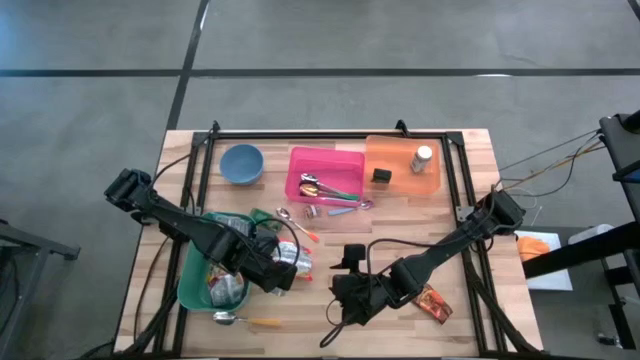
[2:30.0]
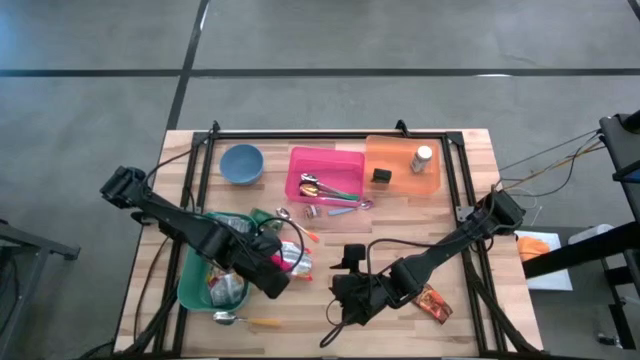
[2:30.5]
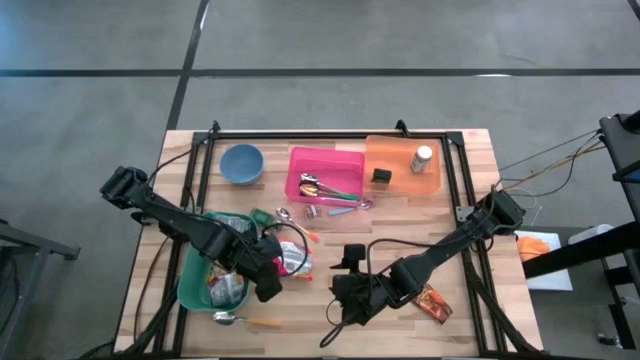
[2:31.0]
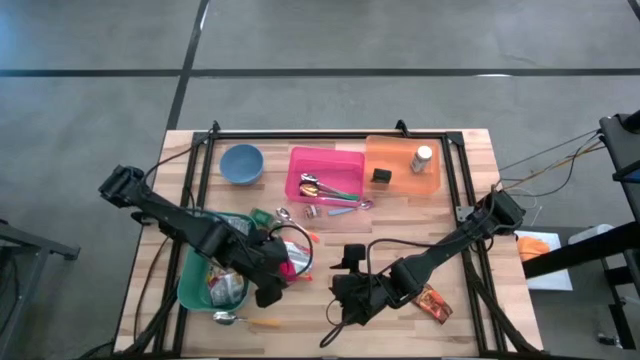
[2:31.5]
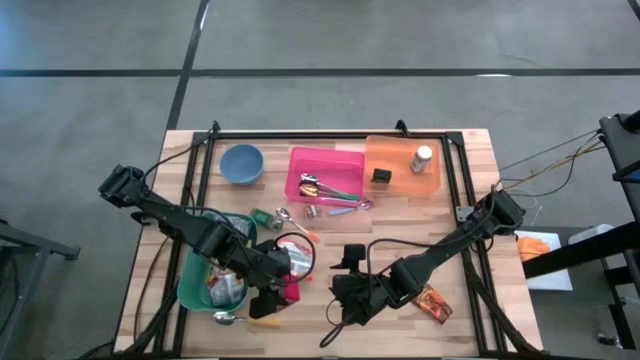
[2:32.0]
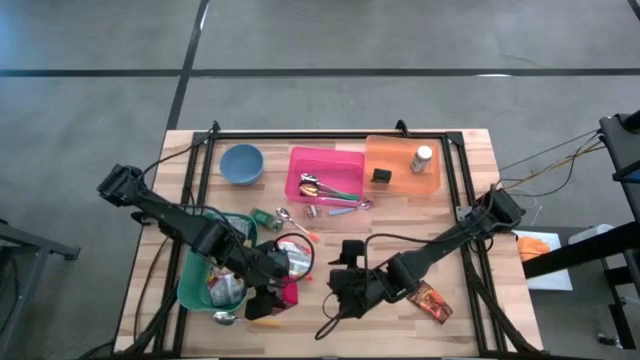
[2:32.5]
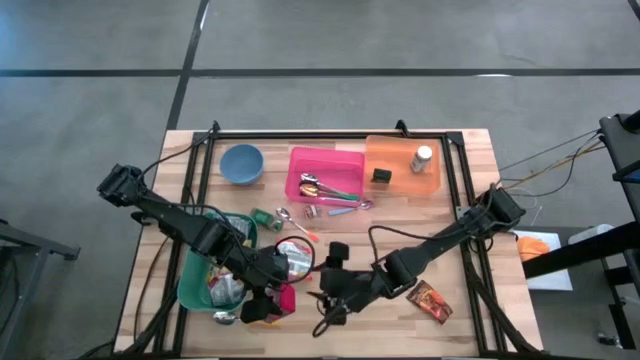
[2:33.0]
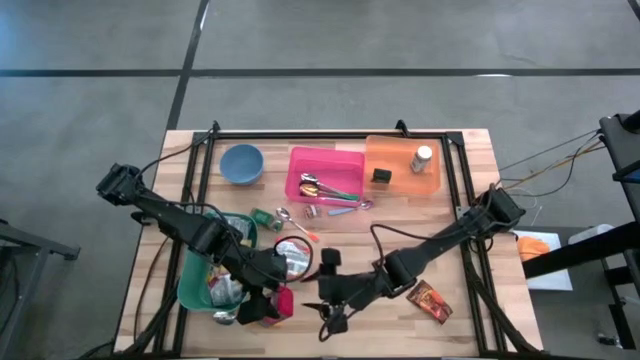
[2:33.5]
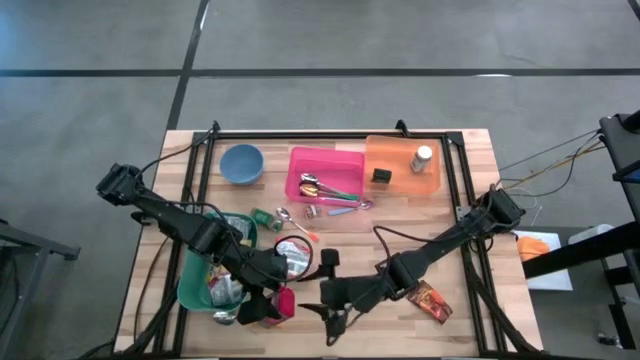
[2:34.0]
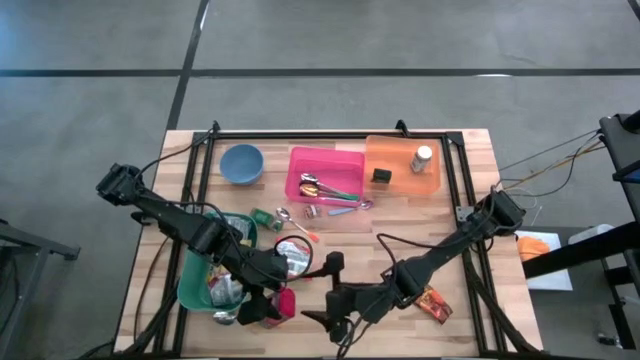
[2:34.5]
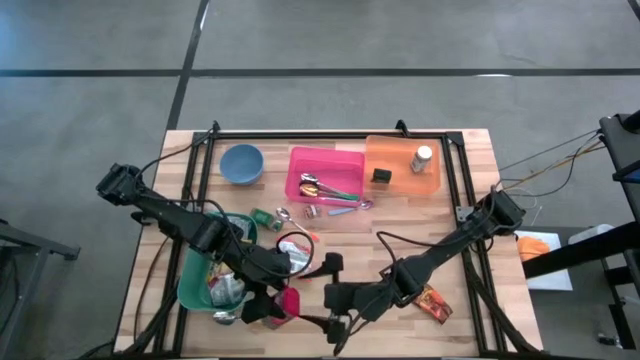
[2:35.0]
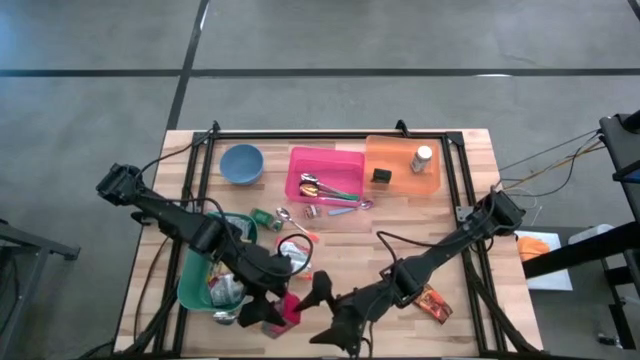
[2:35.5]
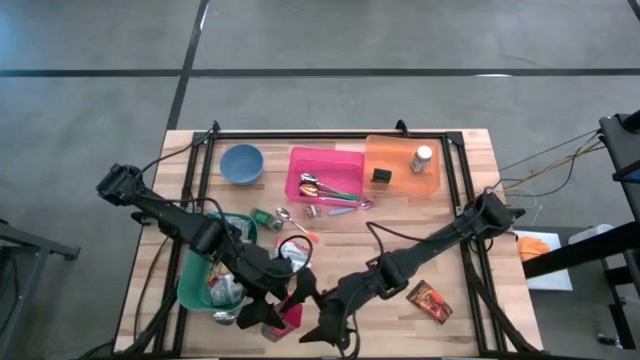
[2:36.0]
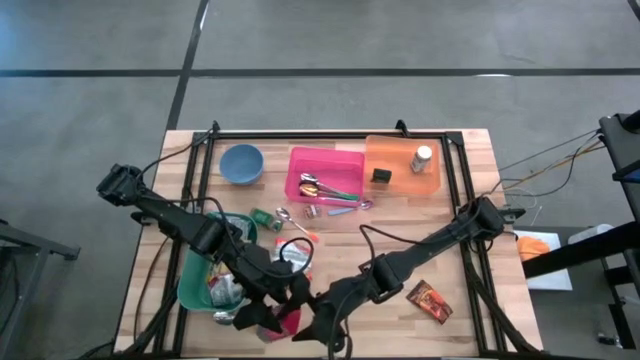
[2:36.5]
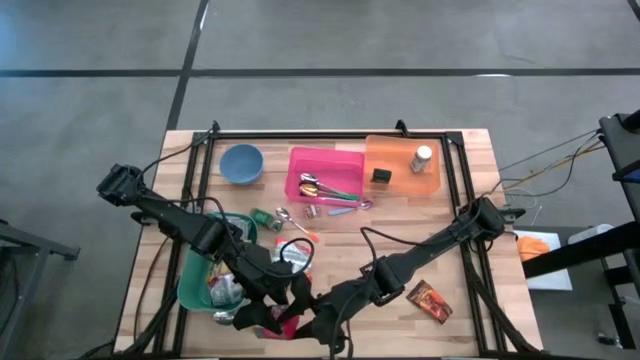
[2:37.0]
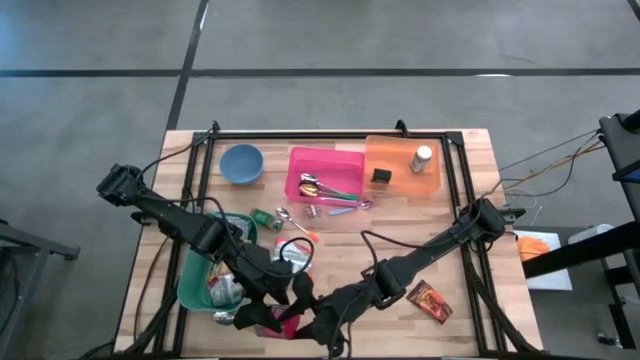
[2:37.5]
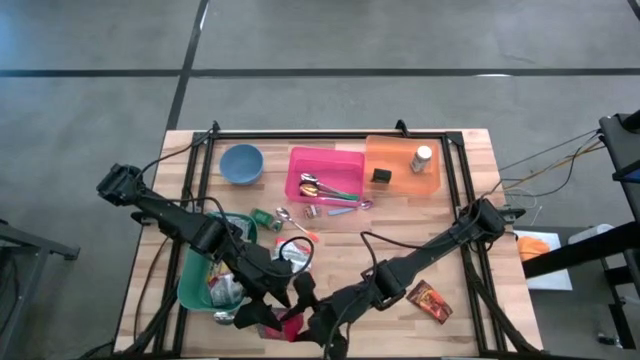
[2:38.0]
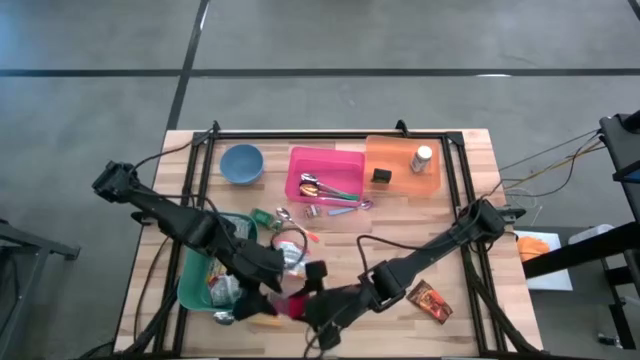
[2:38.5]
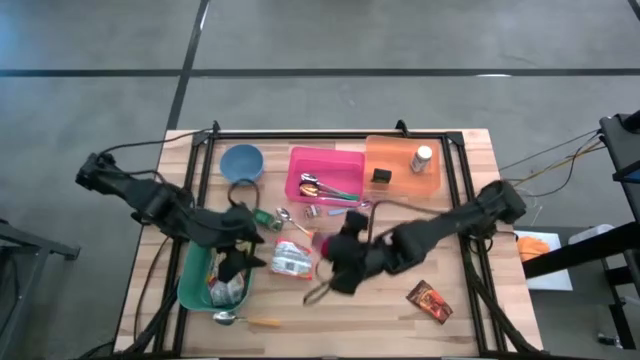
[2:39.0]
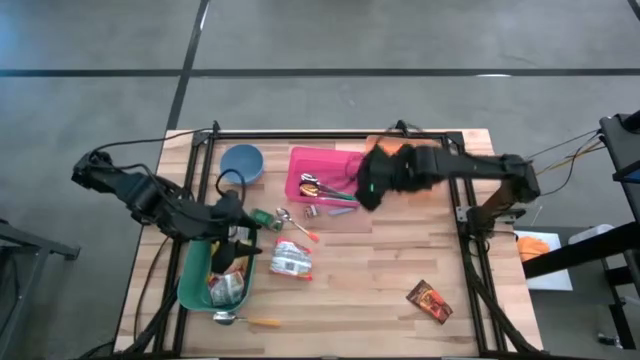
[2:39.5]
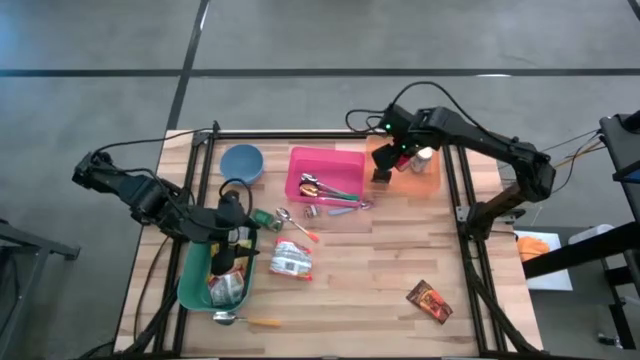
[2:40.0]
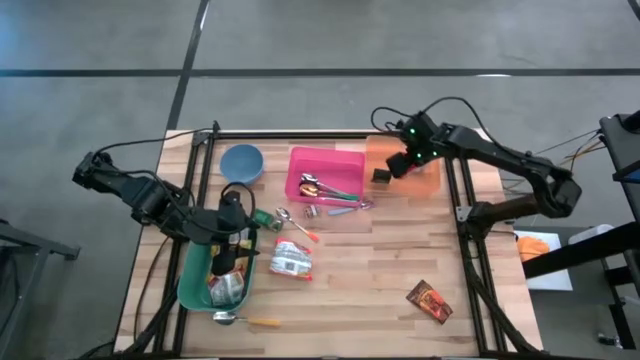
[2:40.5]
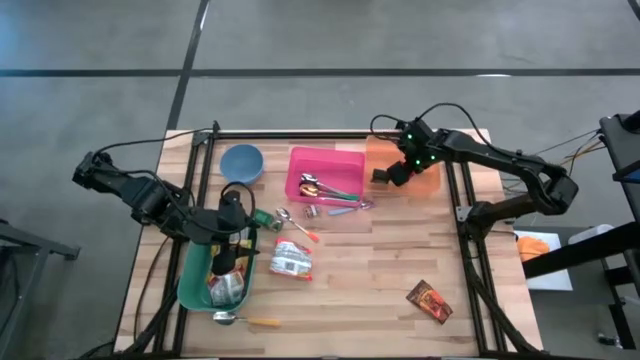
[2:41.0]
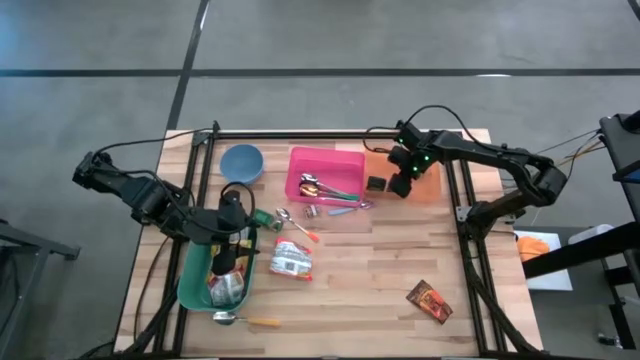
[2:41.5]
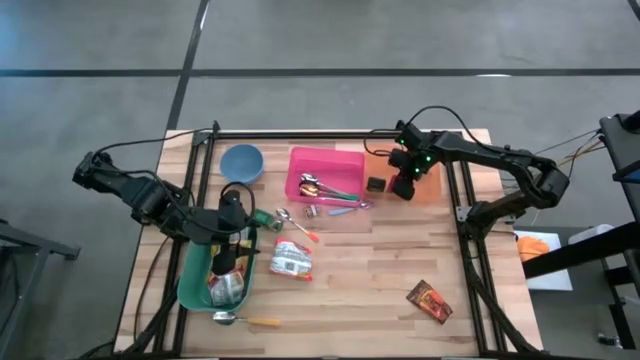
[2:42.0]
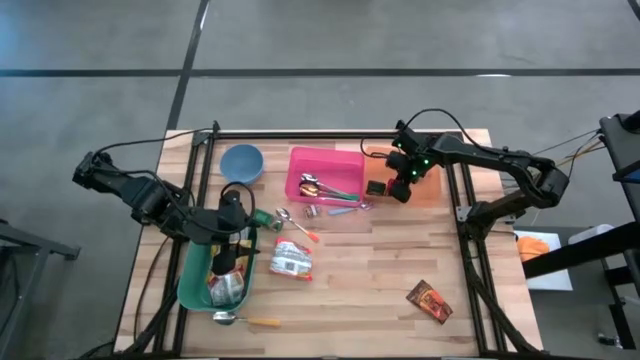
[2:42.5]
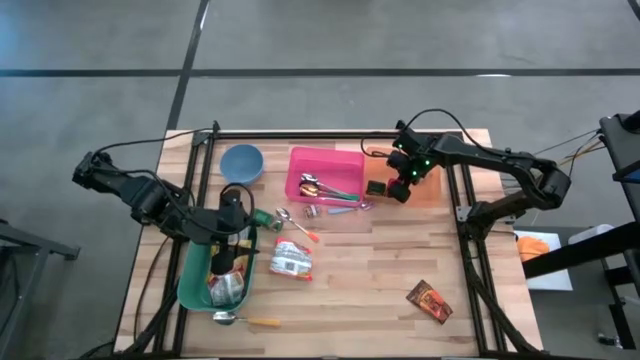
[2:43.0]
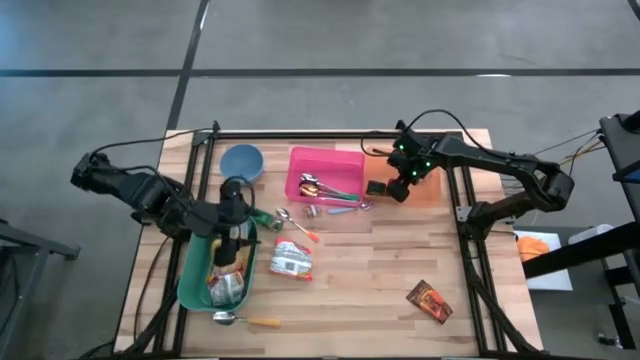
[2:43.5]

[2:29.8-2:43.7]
Put the red spice can into the orange bin
